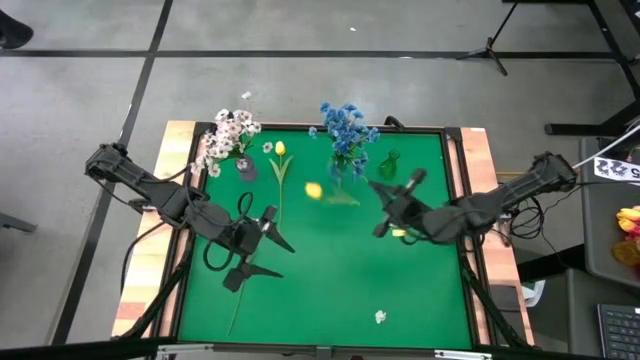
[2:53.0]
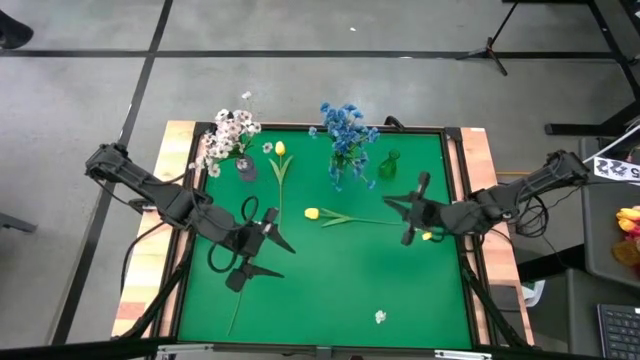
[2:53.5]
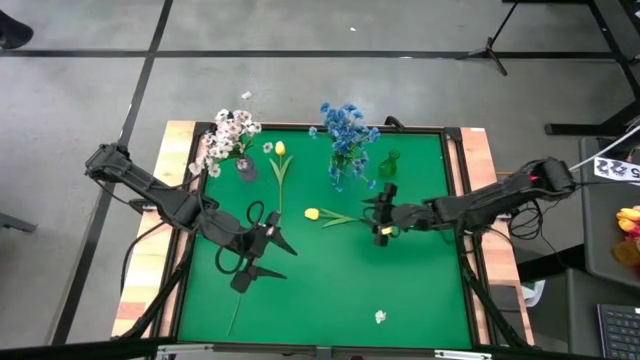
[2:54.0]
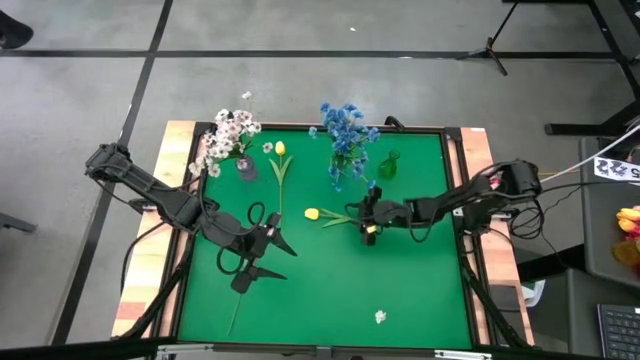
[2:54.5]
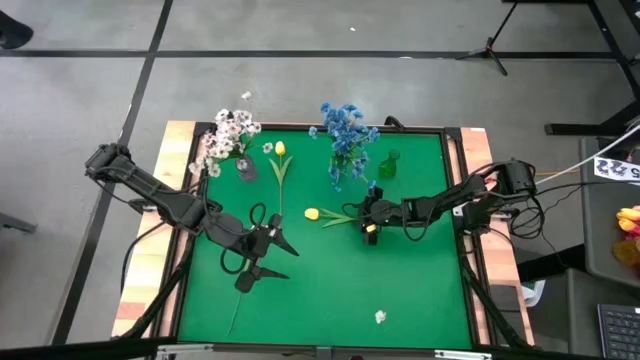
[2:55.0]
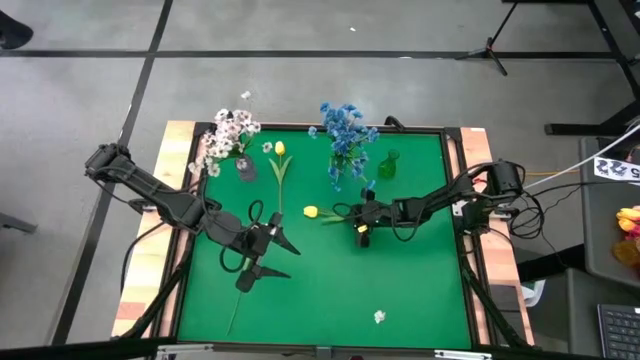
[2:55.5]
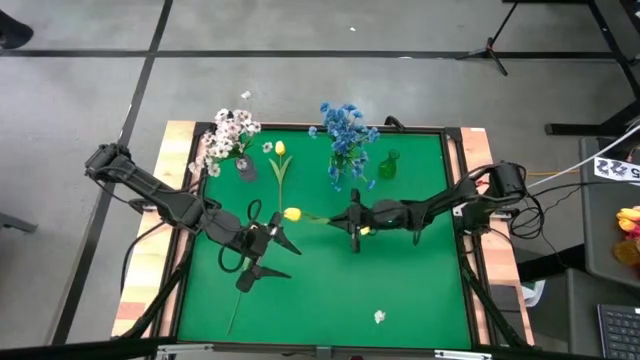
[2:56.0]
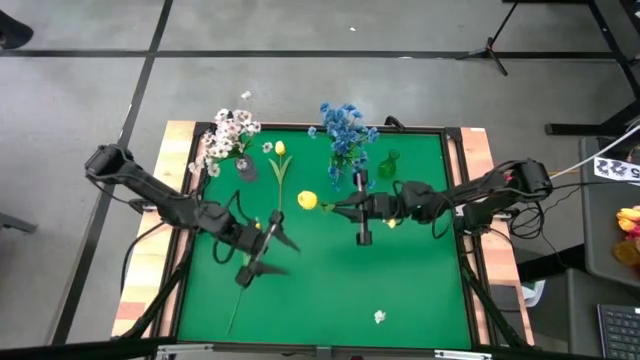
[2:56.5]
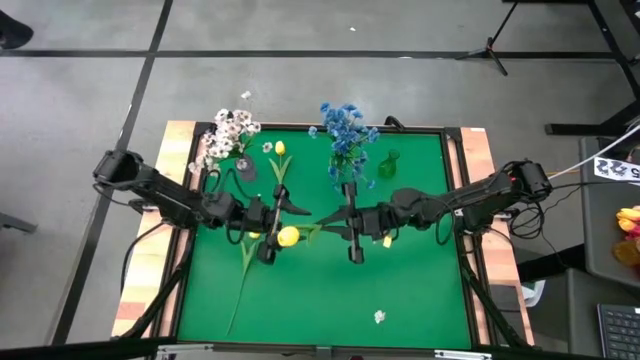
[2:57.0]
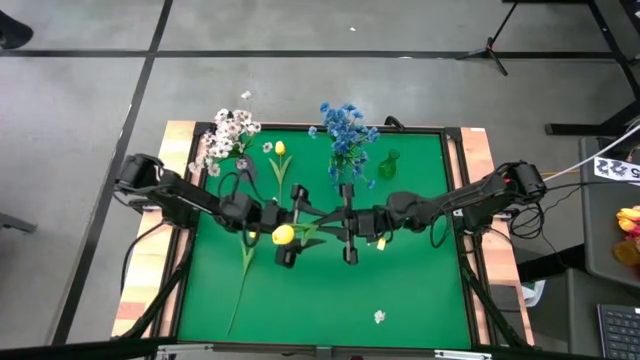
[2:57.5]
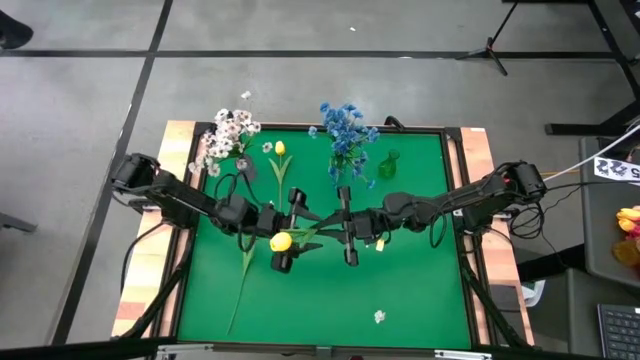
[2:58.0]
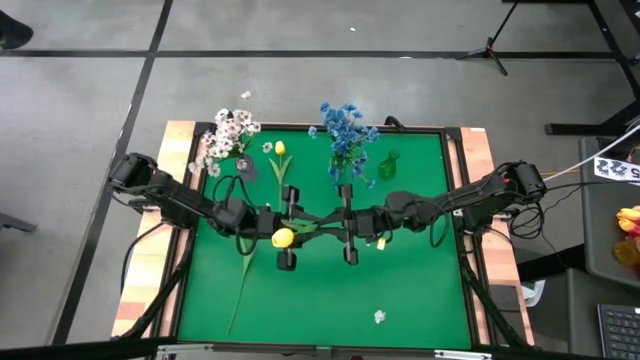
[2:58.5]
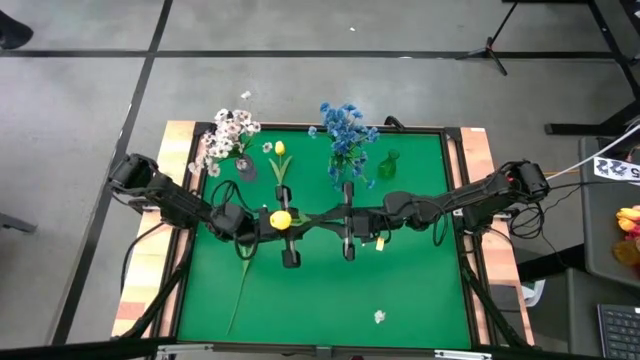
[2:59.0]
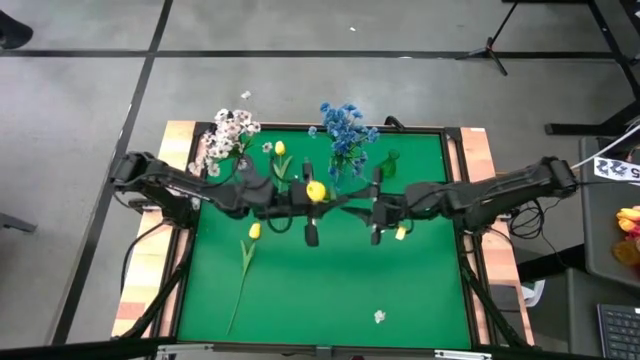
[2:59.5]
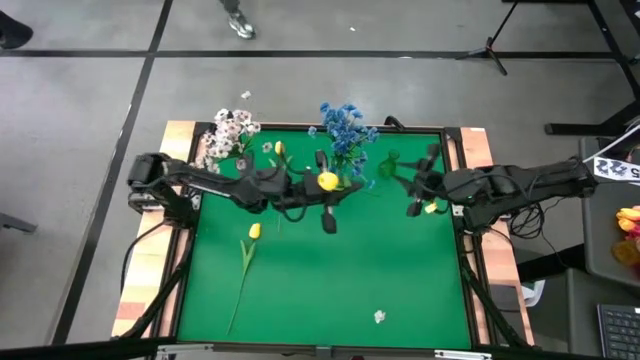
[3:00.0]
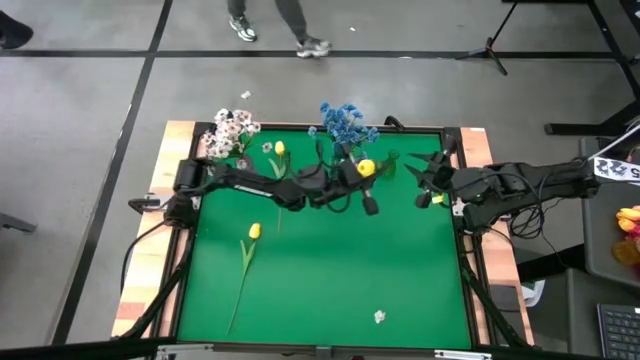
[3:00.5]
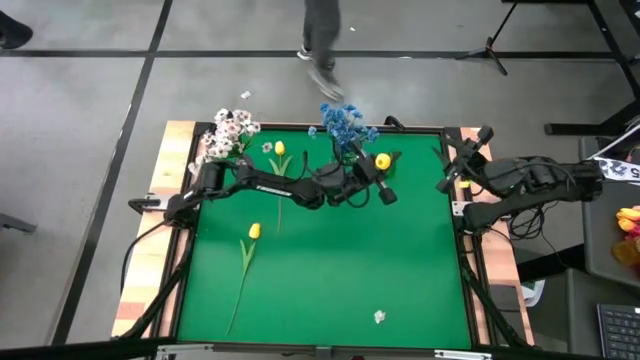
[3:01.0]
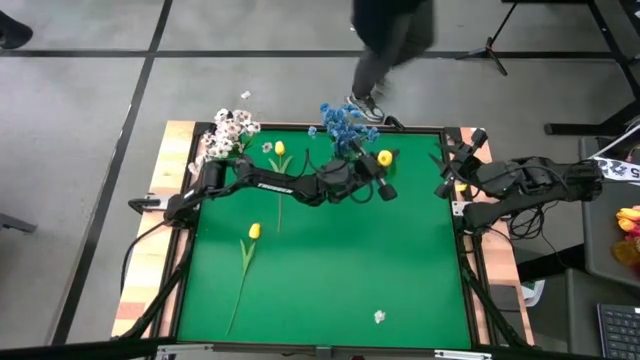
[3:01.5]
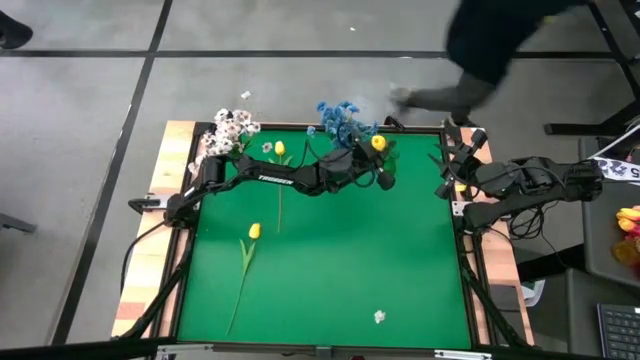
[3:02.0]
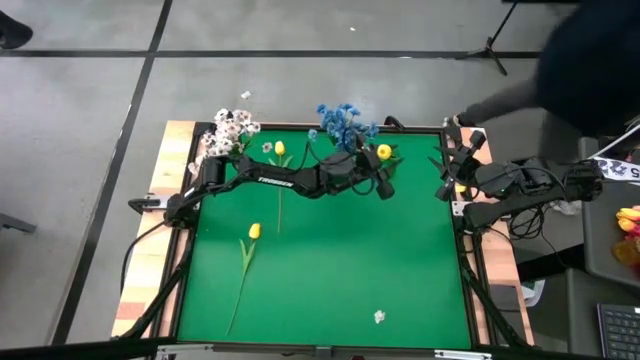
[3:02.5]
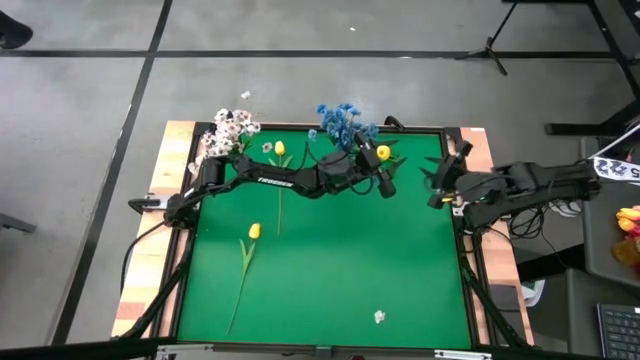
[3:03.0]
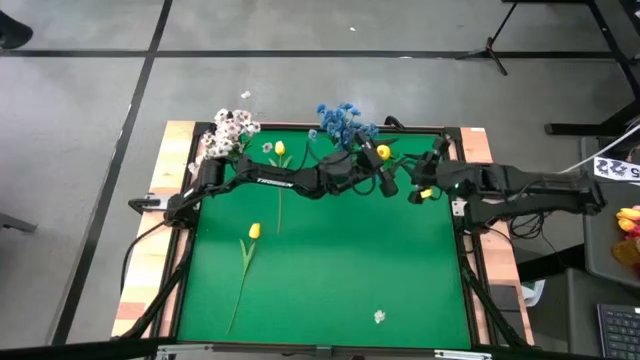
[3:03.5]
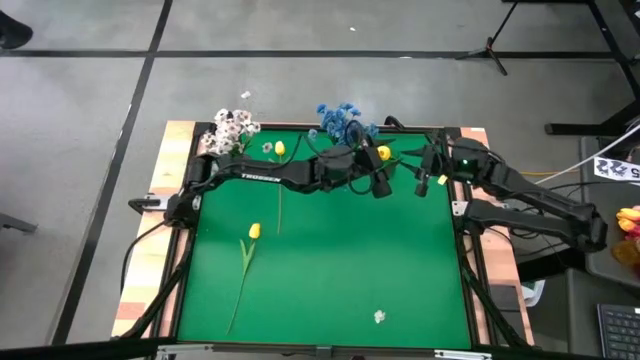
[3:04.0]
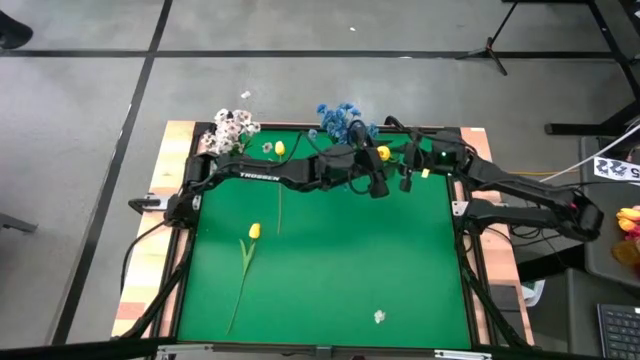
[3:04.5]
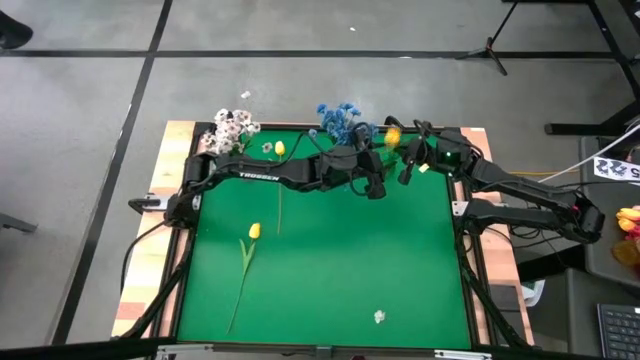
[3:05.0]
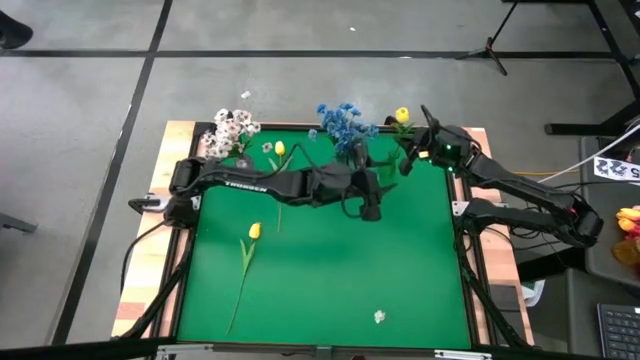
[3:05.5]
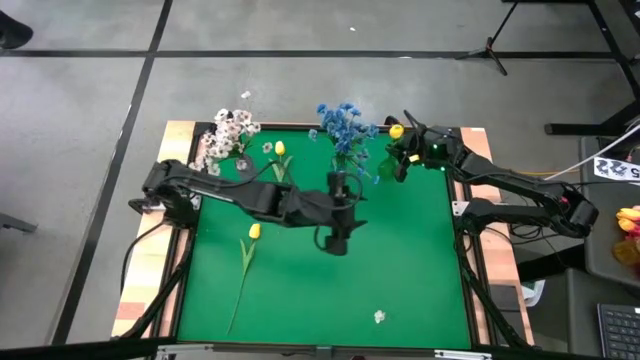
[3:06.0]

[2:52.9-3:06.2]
Task: Sort flowers into vase by color
Put the middle yellow flower into the green vase

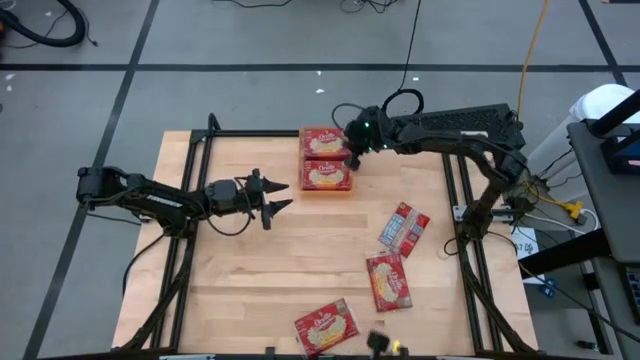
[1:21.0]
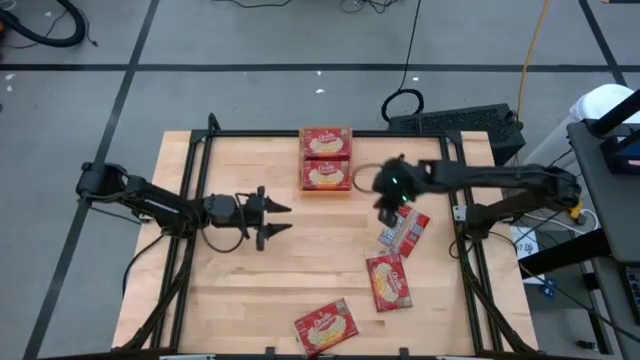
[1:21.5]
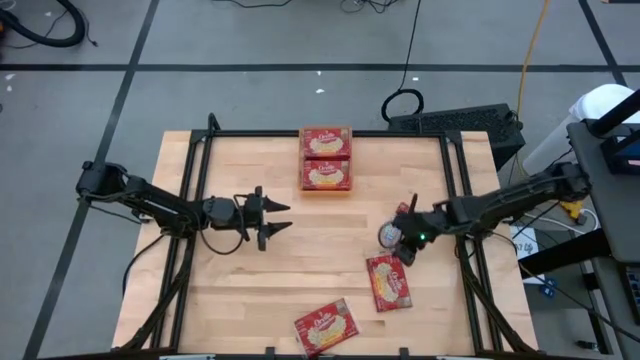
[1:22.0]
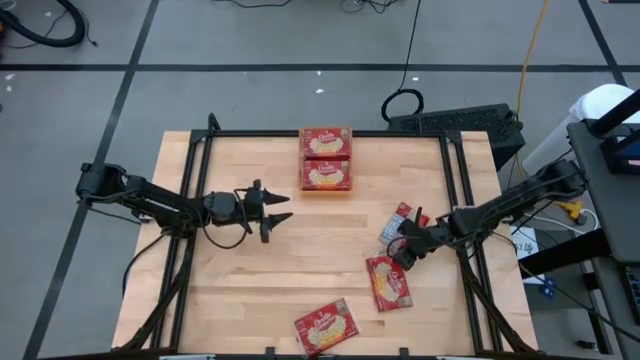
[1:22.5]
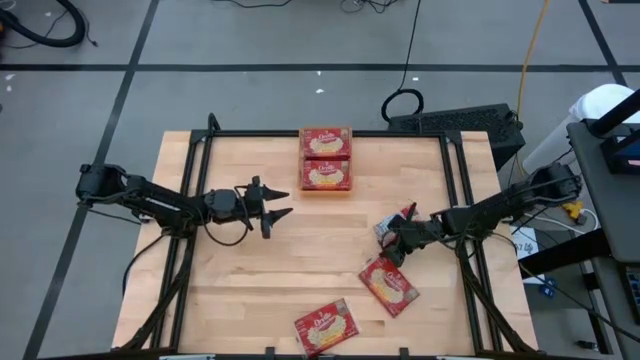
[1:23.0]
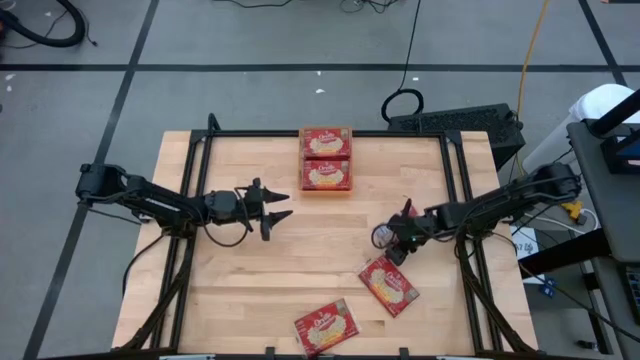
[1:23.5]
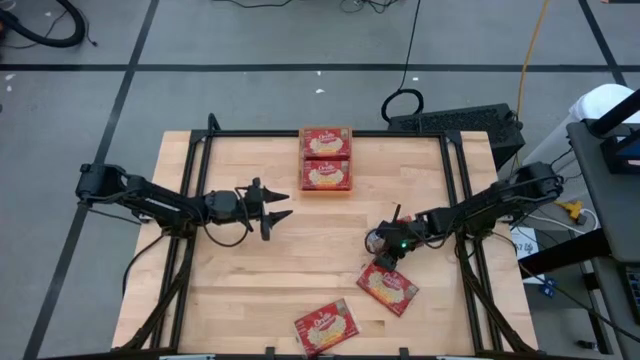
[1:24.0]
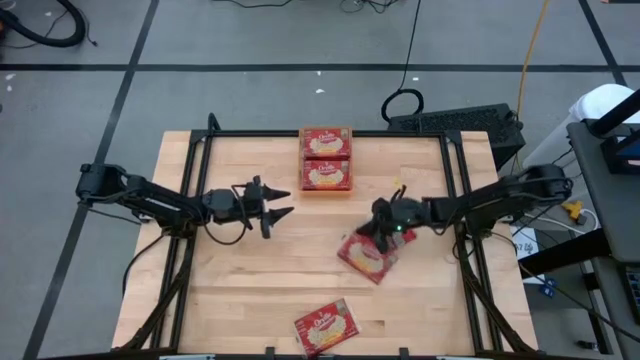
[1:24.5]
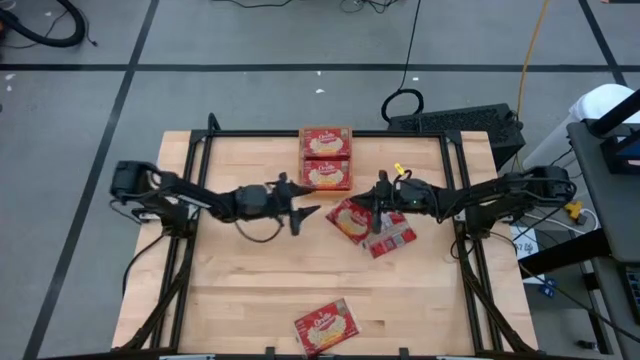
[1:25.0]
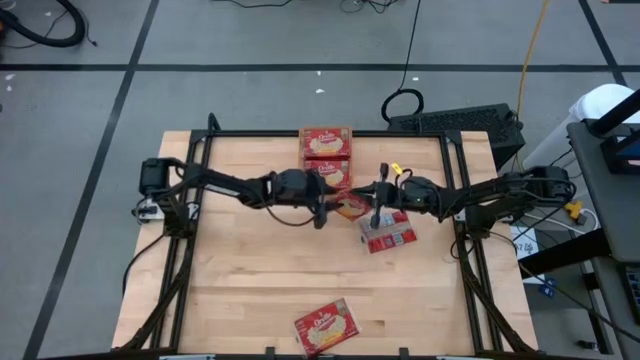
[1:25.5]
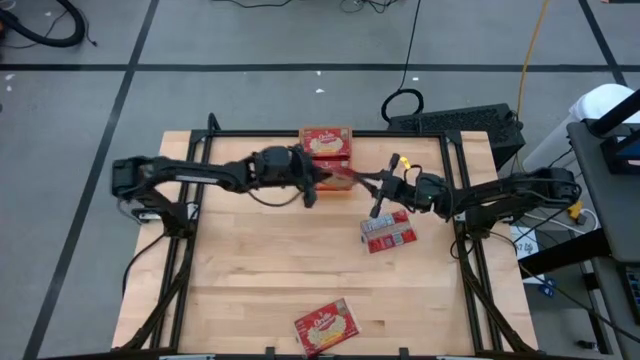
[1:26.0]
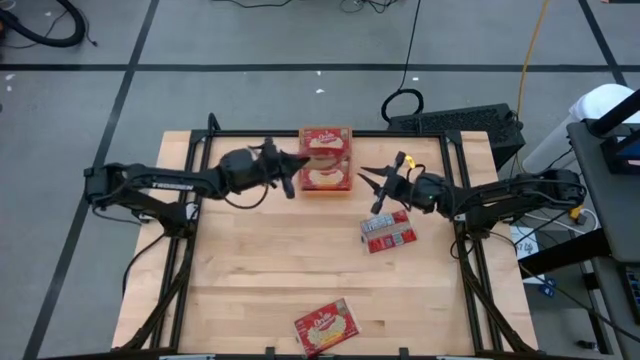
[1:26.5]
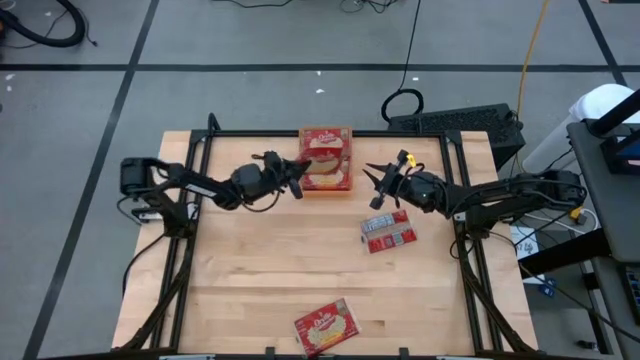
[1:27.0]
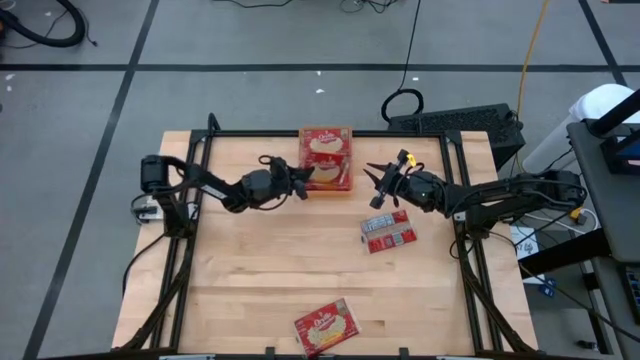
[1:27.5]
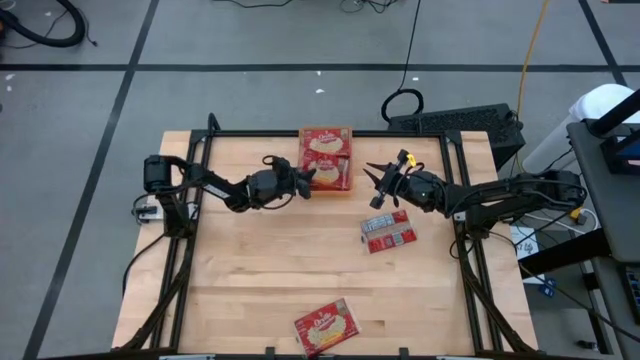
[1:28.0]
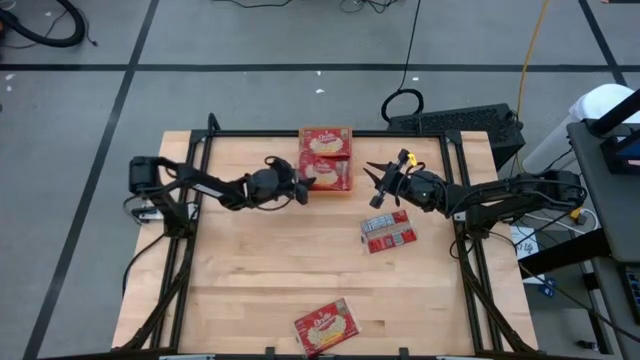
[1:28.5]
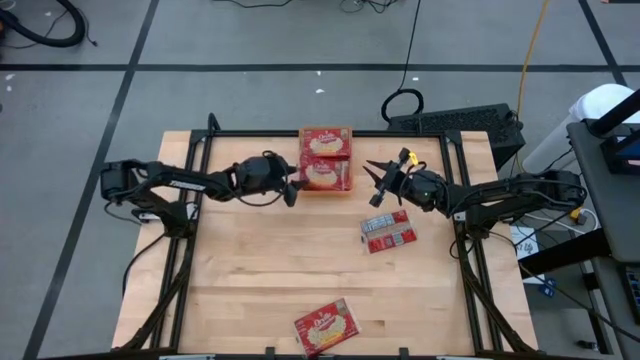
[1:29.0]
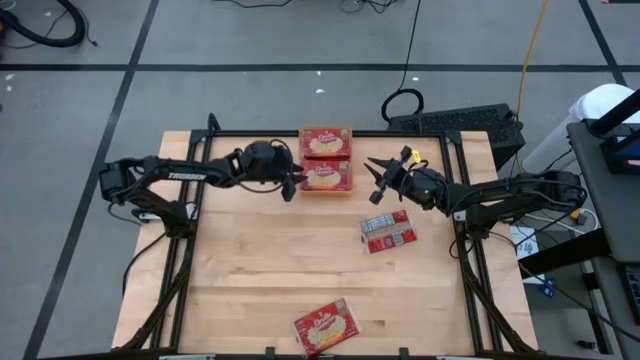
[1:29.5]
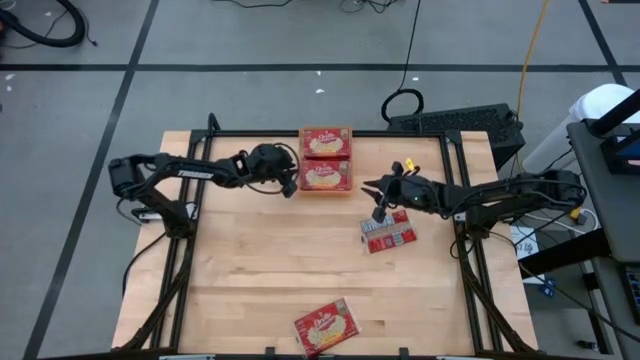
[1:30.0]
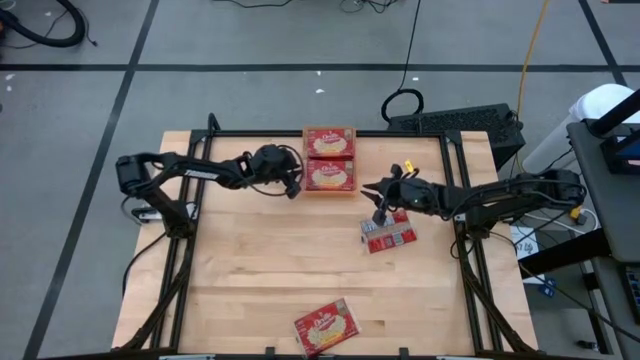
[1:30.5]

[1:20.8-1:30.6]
Task: Sort popcorn bags into baskets
Put the red popcorn bag into the orange bin
